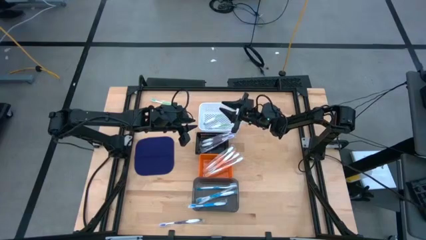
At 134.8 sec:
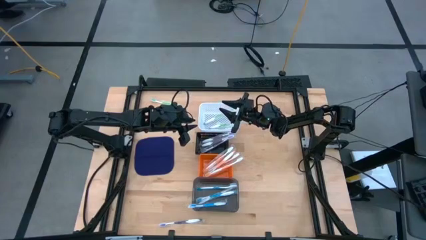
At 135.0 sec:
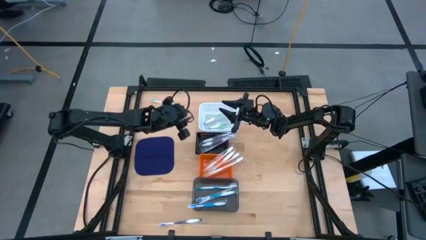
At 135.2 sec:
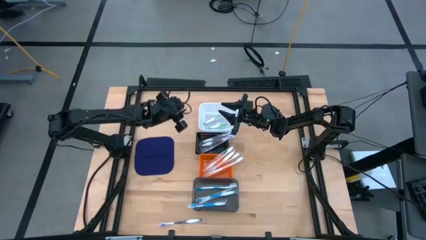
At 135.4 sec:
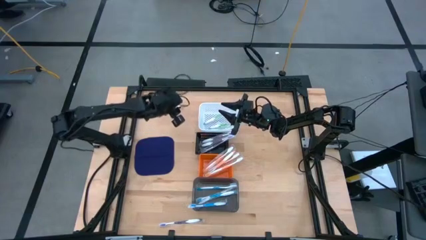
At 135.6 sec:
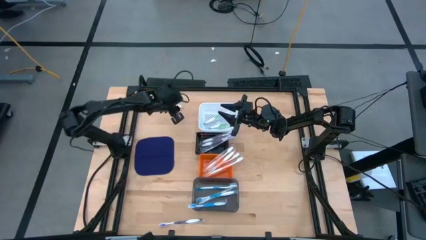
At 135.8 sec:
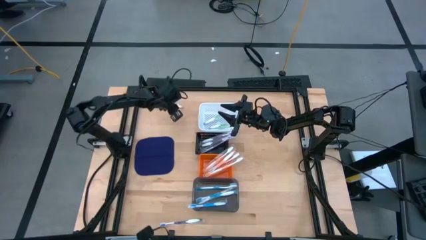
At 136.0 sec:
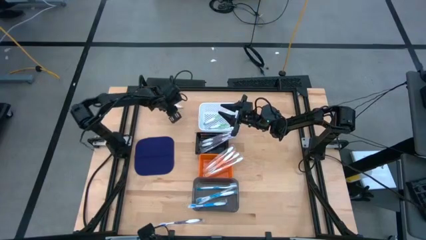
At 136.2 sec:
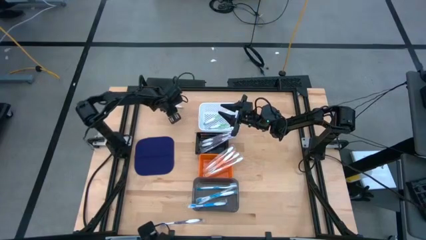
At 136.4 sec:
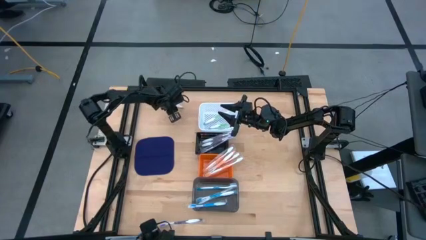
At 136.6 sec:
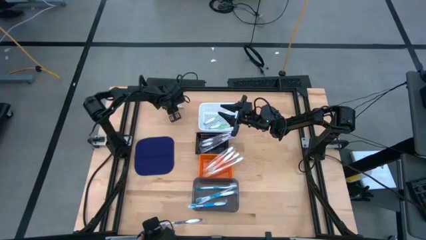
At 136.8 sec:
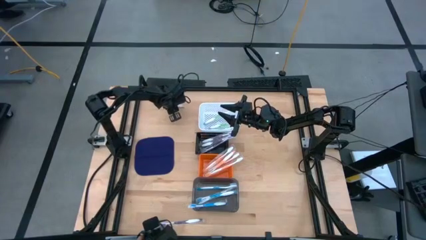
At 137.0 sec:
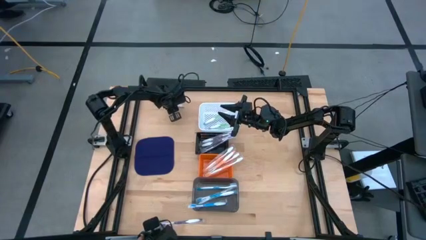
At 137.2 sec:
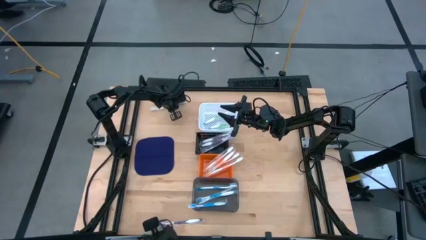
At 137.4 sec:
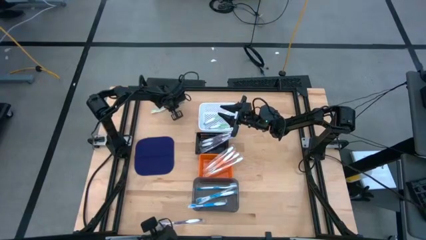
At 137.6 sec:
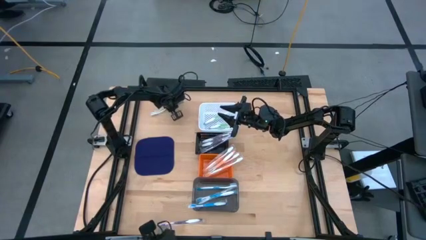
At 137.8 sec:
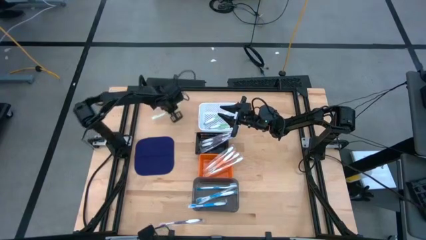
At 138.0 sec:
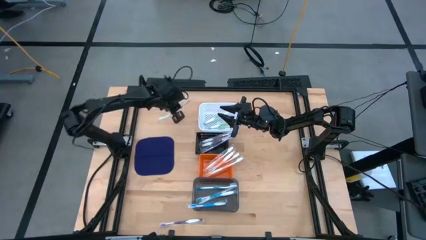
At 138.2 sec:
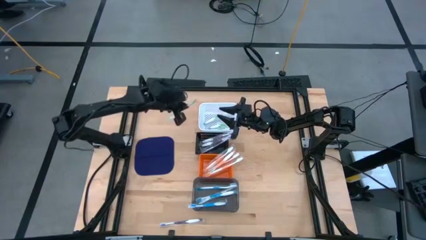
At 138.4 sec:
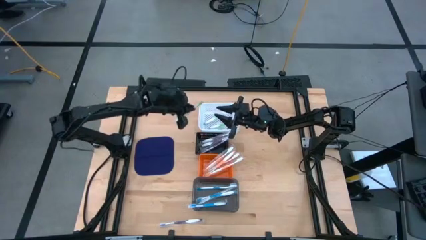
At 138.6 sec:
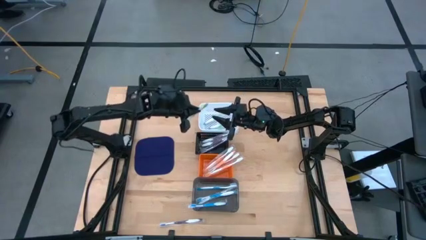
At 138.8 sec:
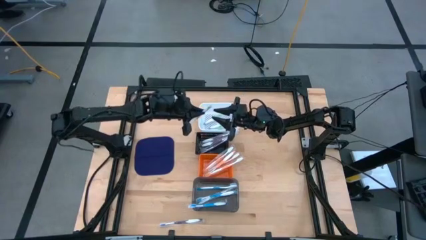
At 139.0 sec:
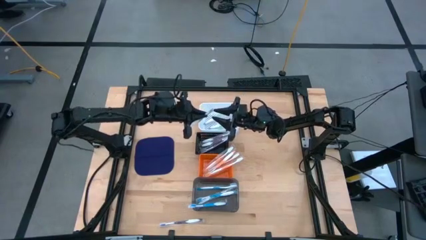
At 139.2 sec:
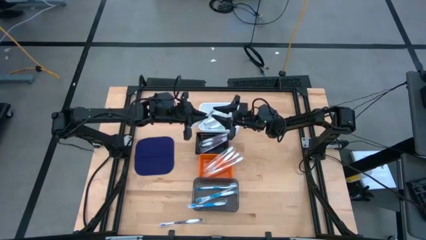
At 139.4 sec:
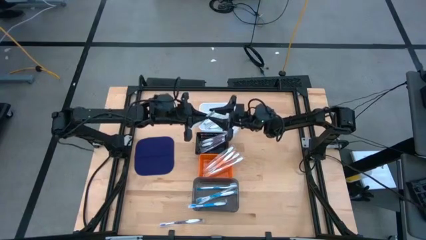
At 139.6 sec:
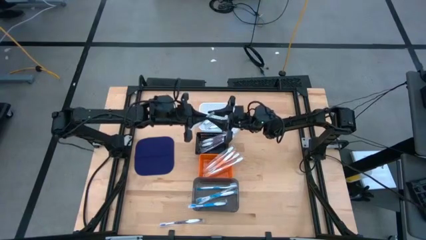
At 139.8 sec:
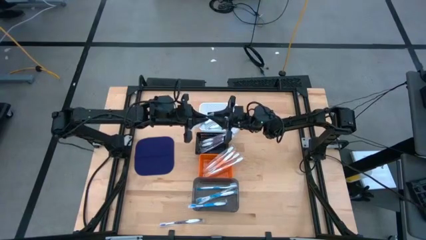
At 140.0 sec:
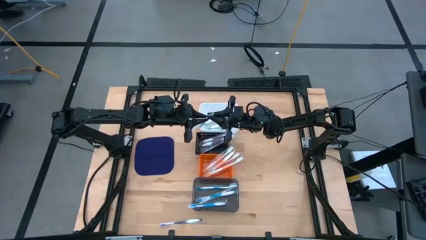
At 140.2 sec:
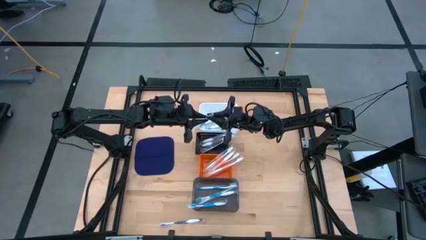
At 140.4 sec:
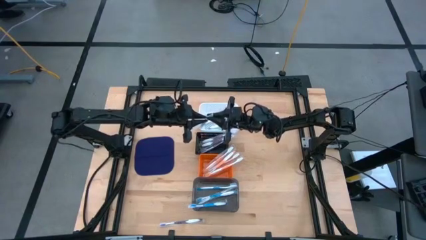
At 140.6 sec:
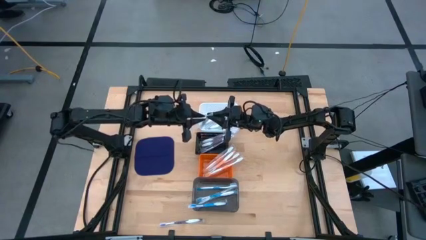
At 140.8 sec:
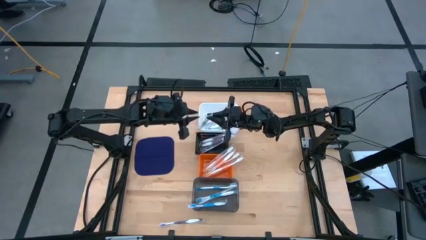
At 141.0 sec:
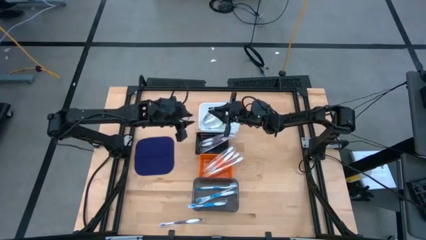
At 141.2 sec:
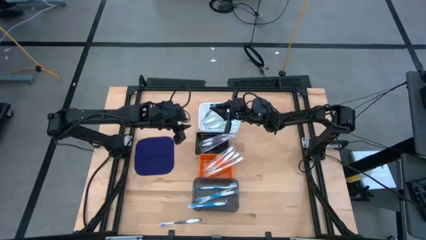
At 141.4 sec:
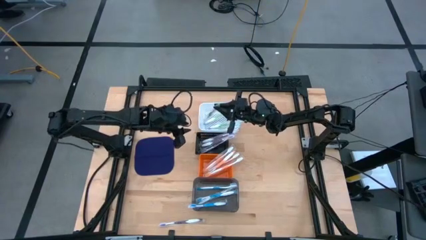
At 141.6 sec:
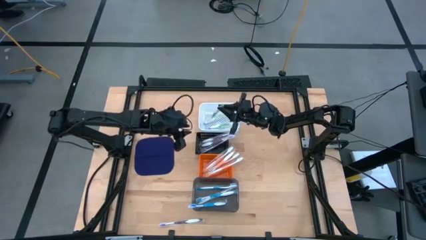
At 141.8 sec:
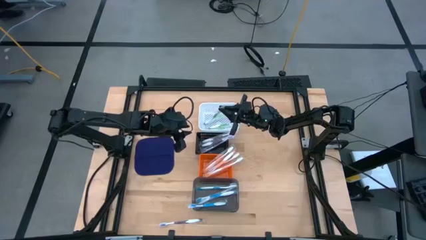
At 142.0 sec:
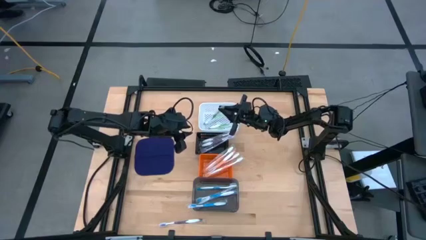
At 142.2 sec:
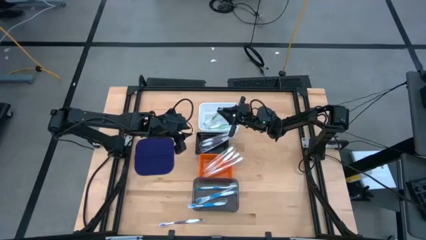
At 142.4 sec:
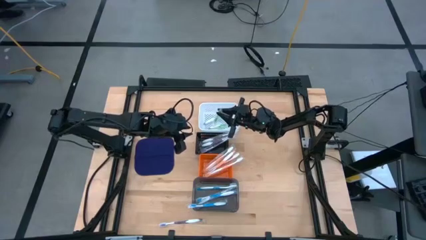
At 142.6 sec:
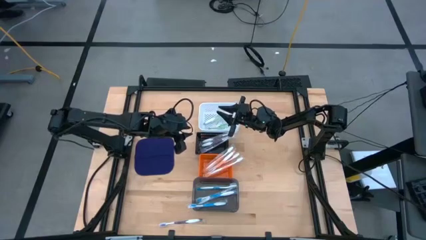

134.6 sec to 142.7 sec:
Task: Pick & Place Toothbrushes
Put the green toothbrush into the white bin

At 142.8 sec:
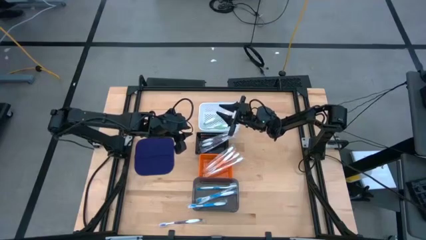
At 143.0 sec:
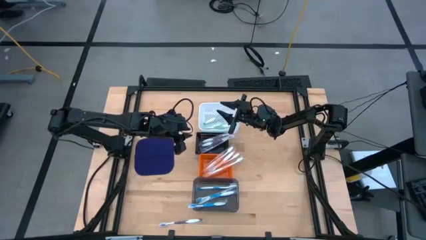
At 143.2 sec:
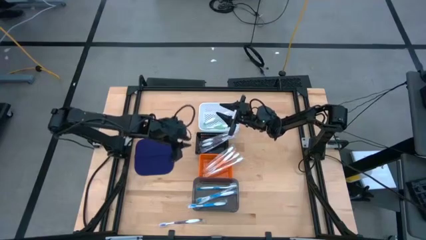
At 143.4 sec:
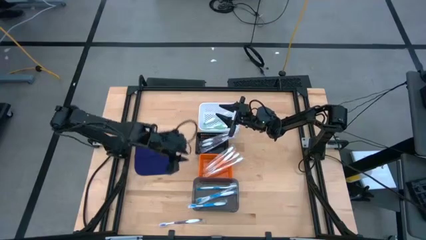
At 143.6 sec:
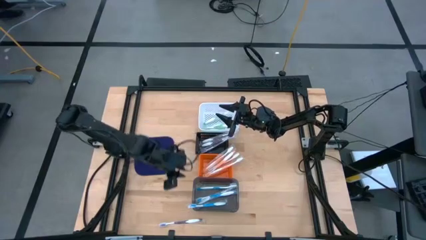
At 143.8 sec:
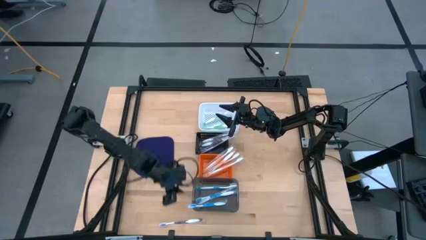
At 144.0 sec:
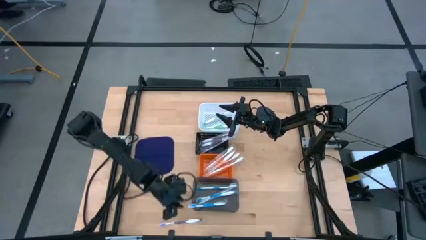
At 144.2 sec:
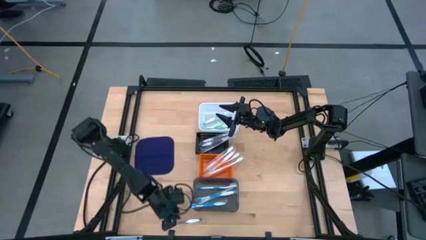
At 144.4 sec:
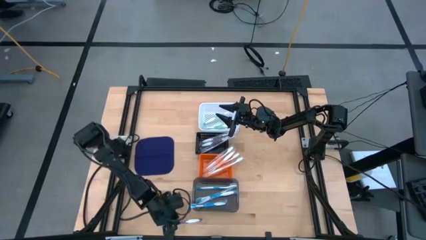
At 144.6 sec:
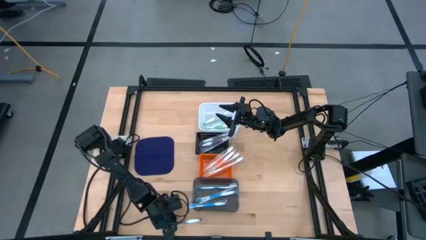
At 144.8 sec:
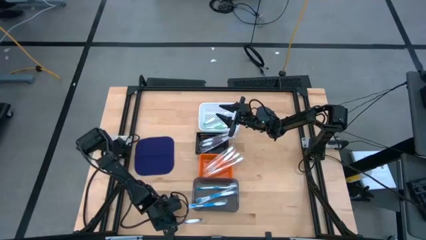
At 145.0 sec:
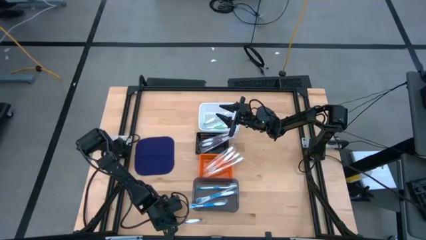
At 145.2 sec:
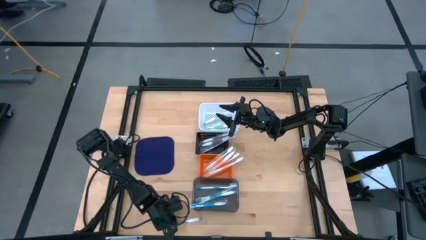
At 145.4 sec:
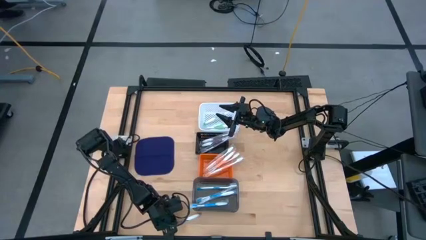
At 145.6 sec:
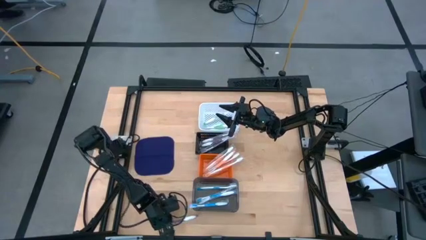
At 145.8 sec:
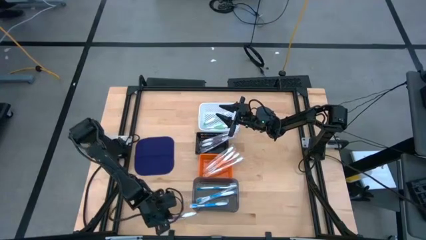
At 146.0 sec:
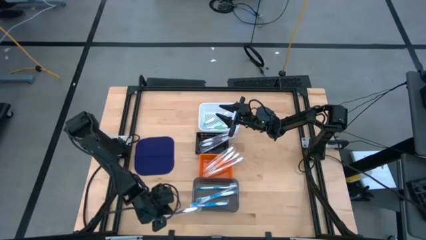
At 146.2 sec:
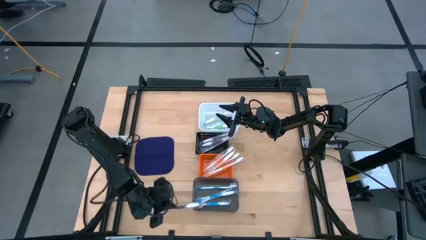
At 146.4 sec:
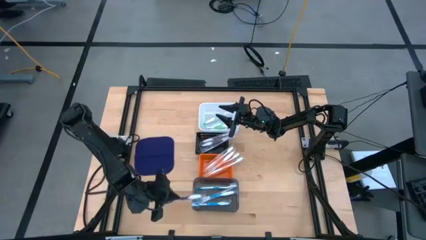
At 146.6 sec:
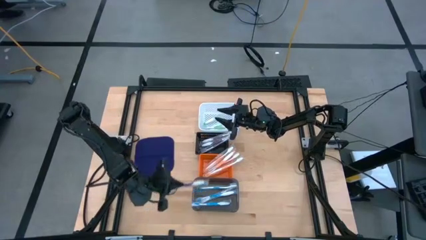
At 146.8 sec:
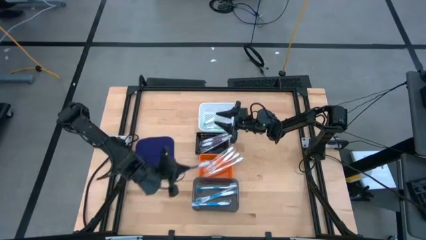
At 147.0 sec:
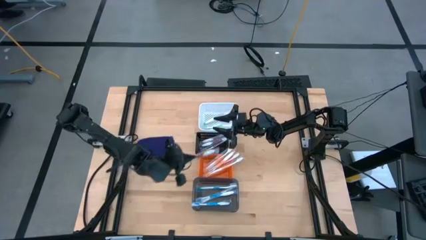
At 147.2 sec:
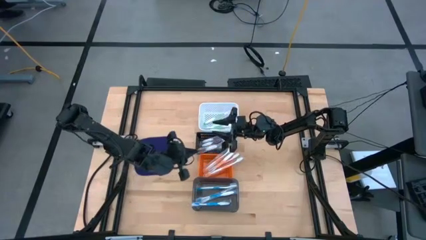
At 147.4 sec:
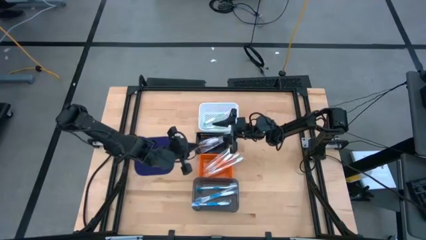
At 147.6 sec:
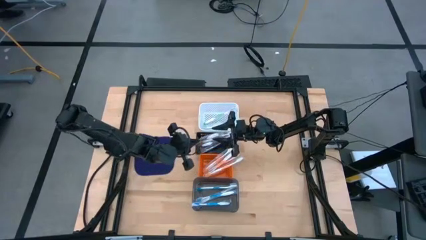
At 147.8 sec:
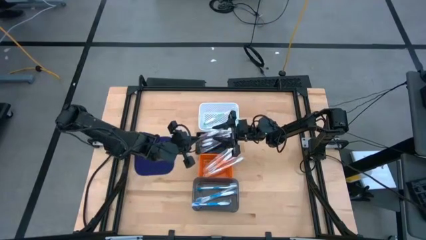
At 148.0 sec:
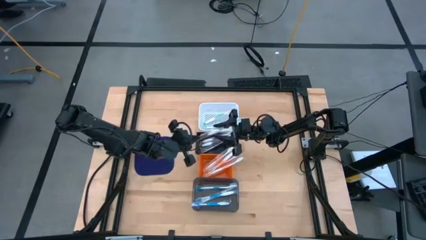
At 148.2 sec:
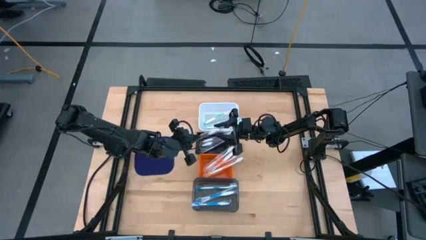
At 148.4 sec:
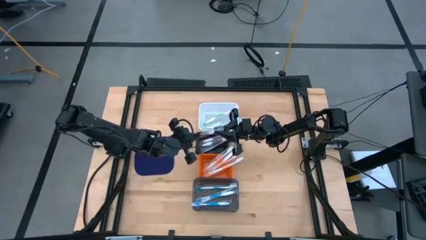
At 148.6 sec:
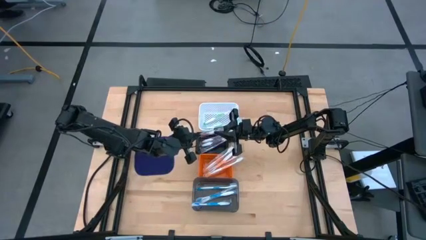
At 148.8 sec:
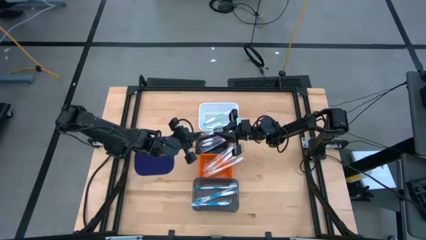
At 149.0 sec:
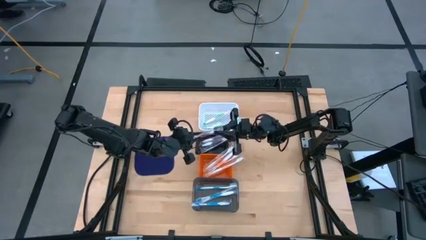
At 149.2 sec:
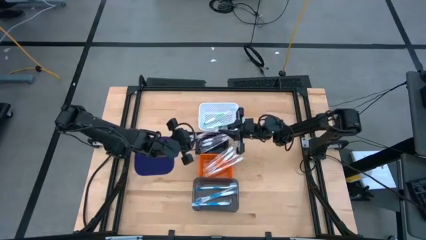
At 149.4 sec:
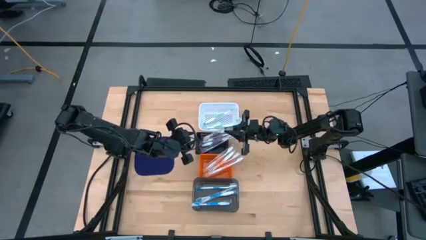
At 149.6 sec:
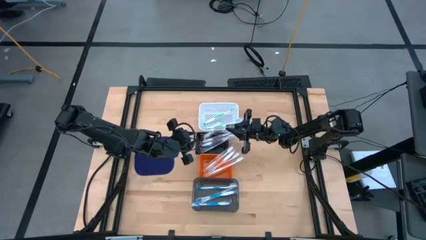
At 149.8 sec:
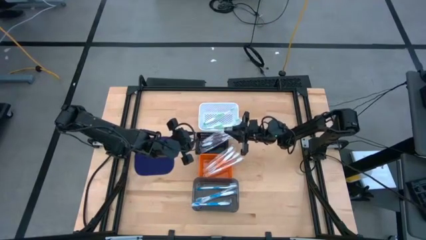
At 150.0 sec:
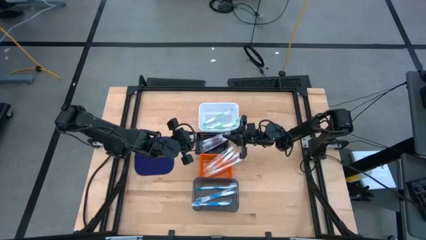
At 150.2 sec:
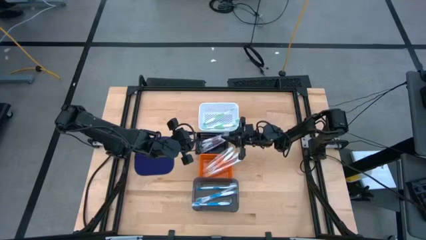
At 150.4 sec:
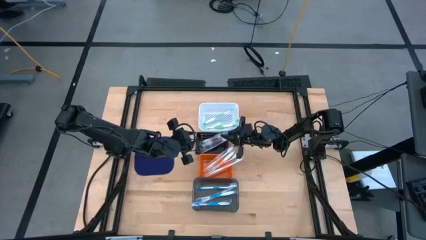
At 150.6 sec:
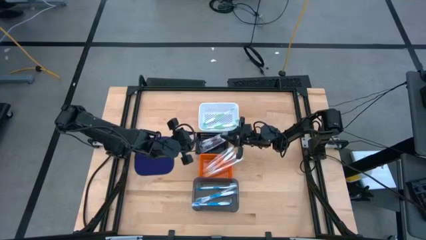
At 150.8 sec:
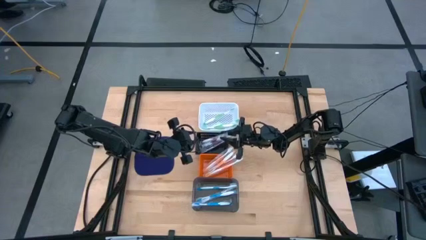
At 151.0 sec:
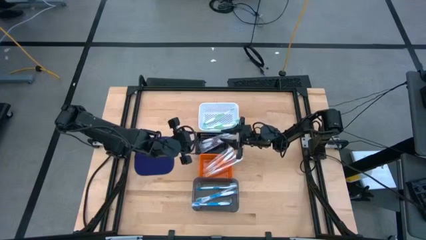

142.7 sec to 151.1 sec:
Put the violet toothbrush into the black bin
